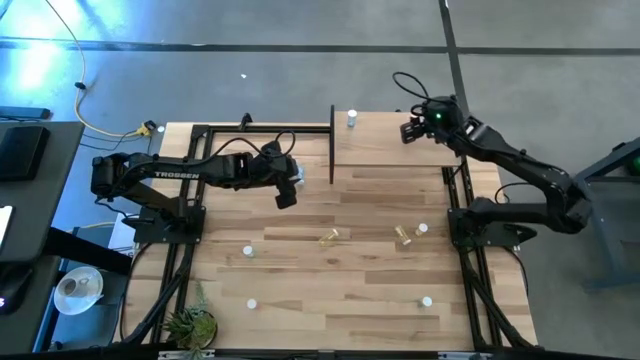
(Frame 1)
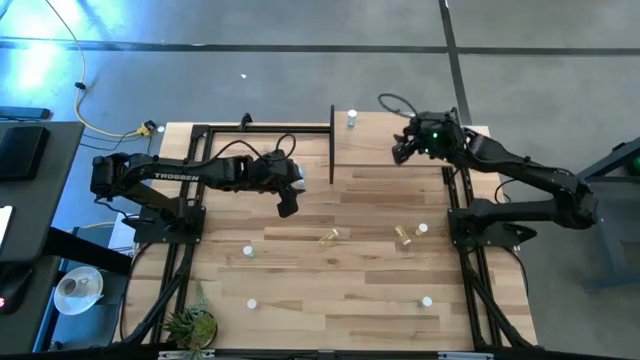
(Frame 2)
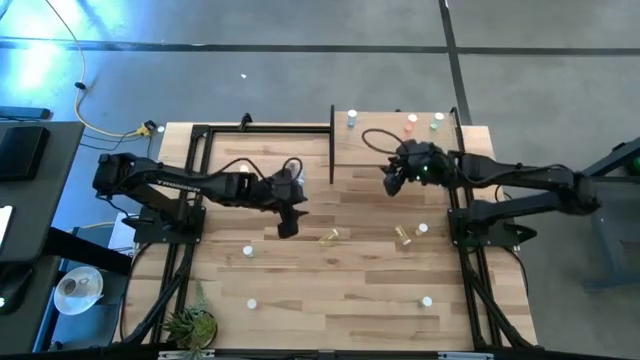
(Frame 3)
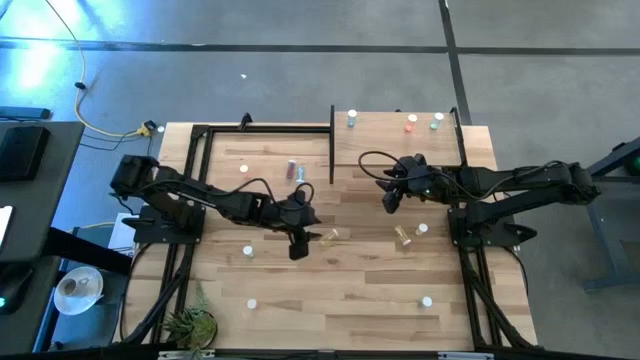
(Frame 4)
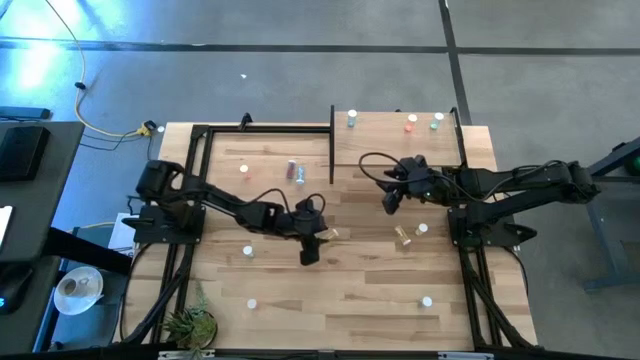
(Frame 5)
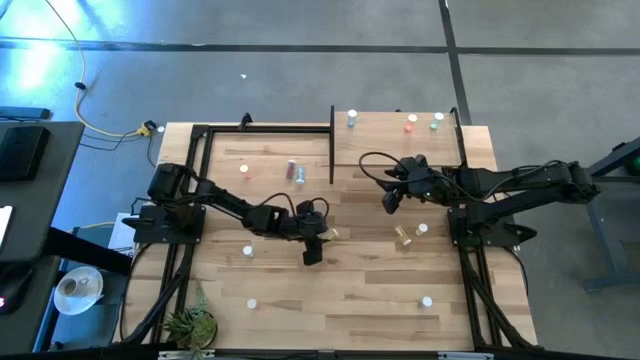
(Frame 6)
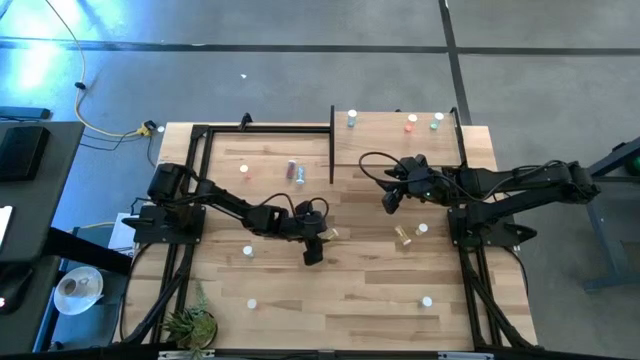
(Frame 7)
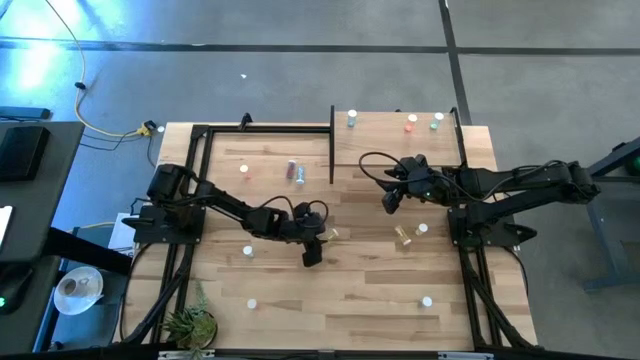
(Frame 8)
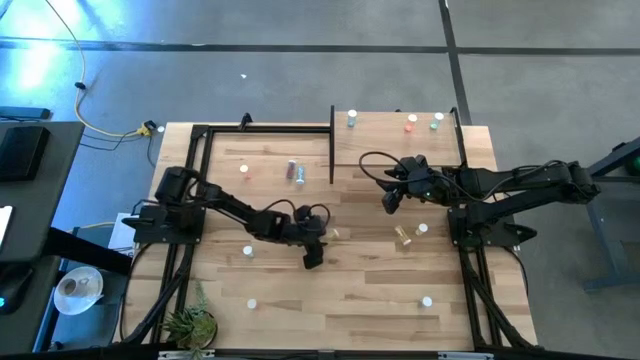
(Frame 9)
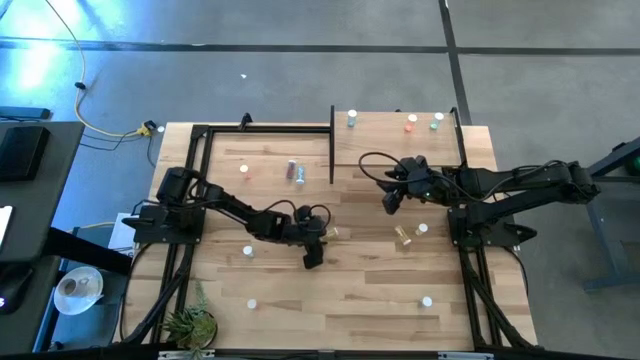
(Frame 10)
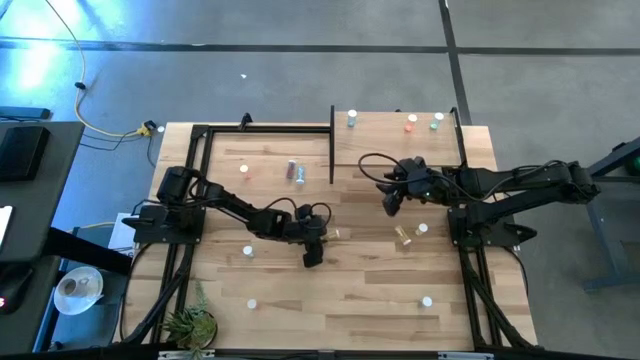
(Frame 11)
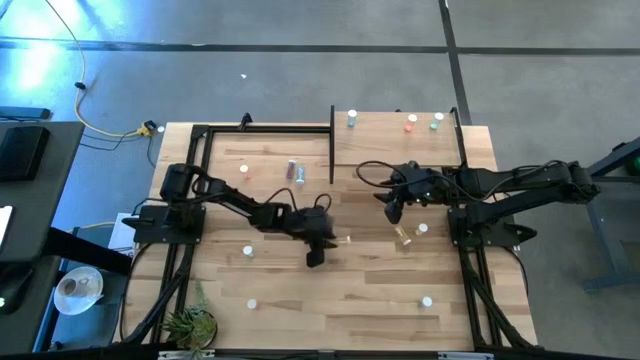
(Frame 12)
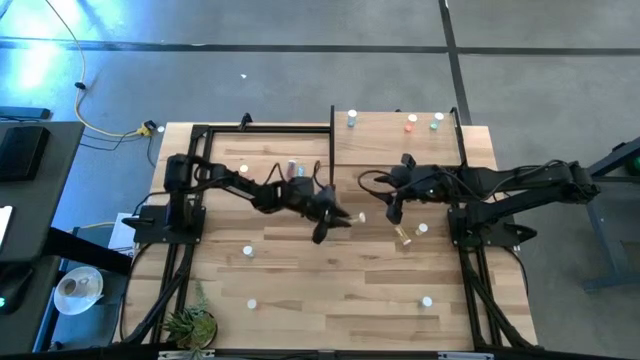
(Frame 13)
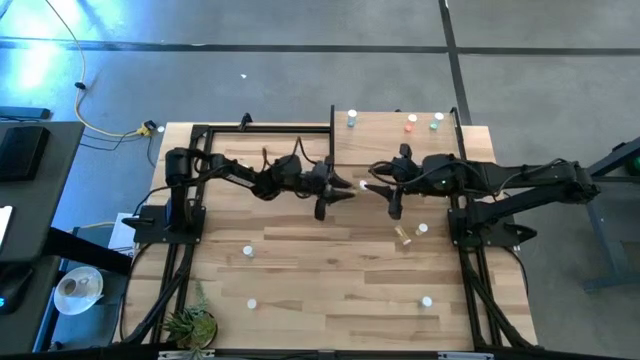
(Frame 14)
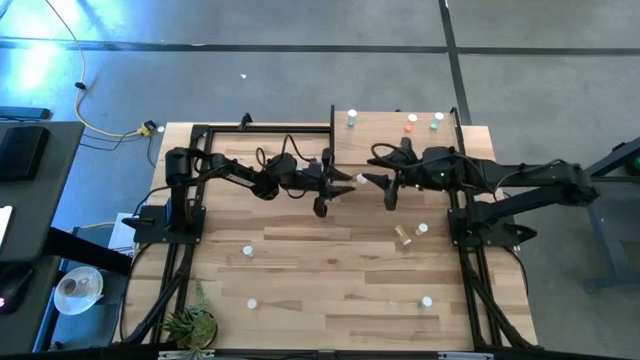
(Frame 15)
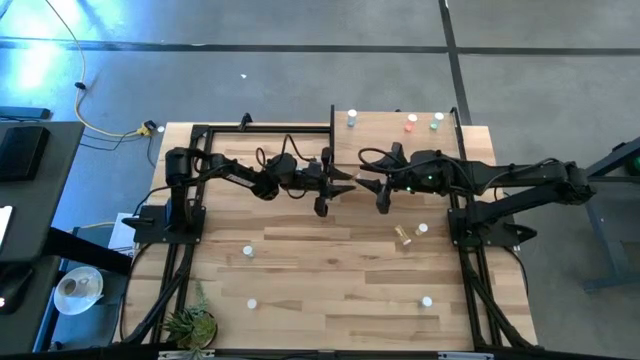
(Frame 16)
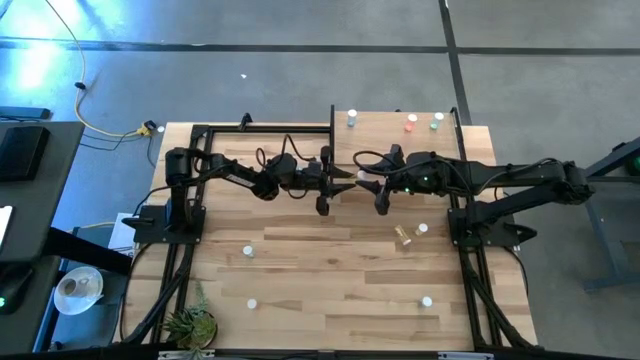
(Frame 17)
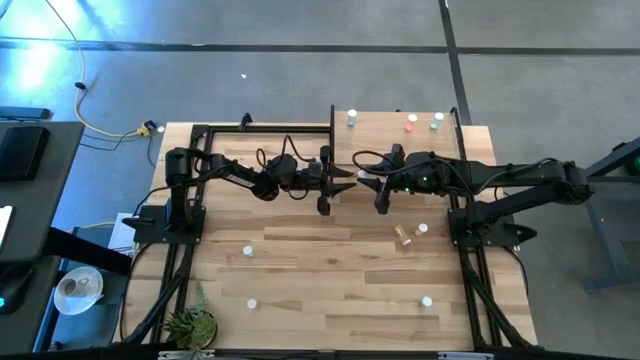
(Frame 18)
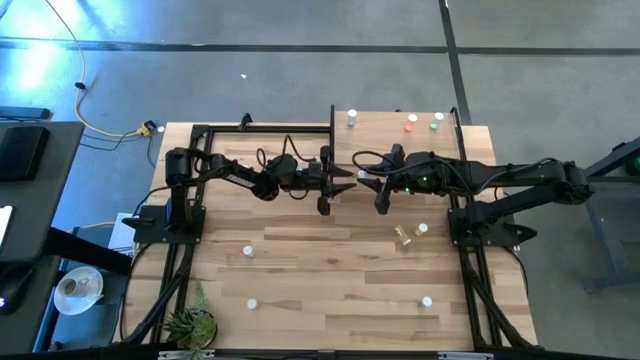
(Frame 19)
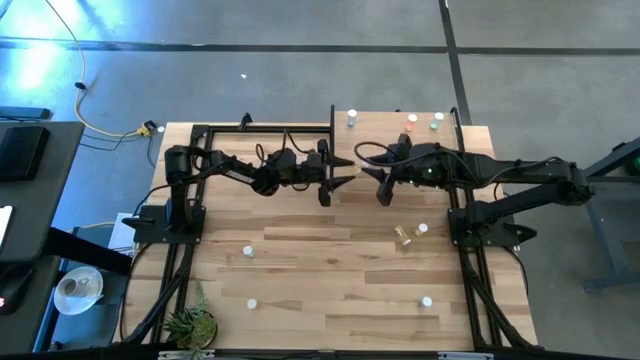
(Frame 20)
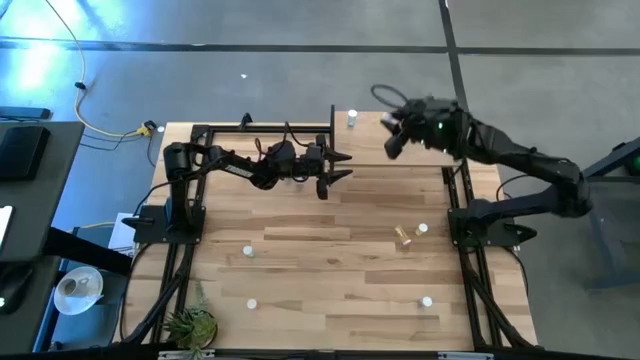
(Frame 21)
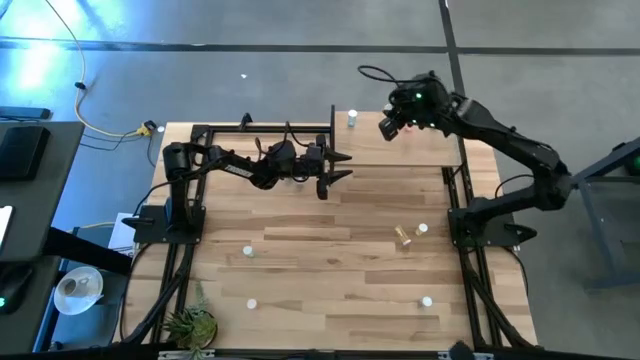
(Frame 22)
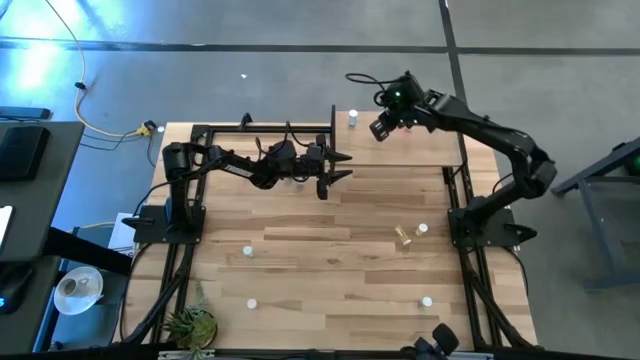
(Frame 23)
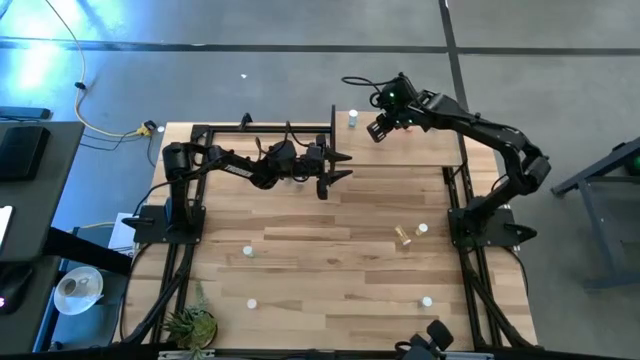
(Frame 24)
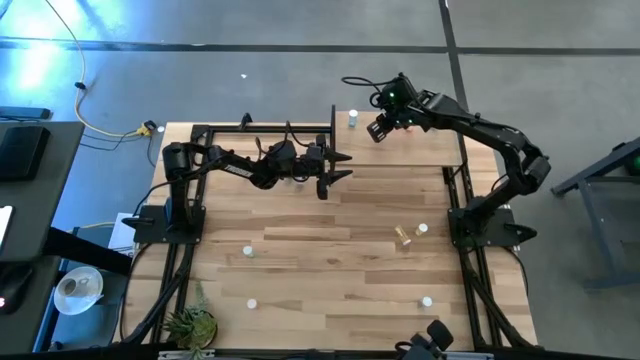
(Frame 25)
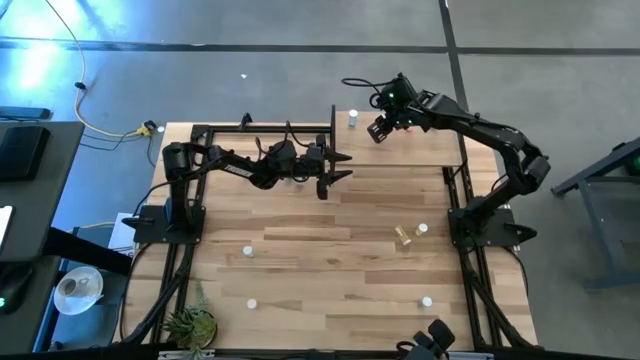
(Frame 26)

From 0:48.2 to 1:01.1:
Task: Pick and place medicine bottles onto shelf by color
Put the left yellow medicine bottle on the shelf

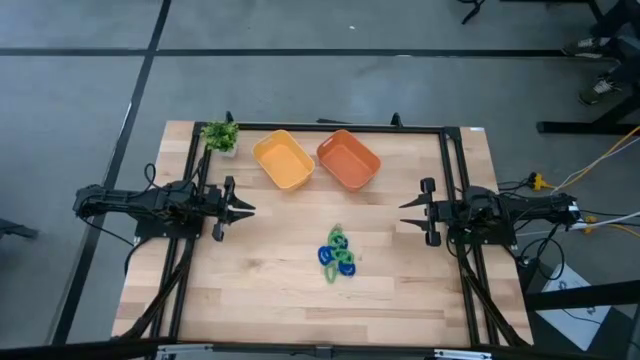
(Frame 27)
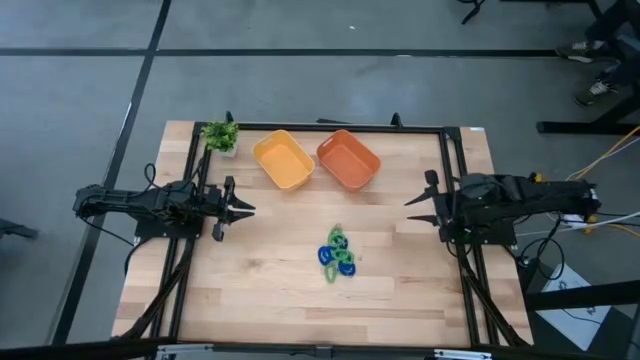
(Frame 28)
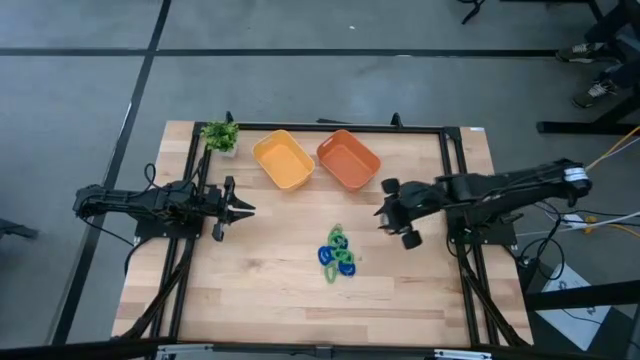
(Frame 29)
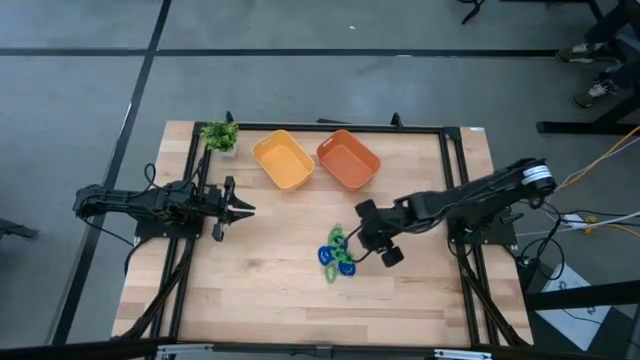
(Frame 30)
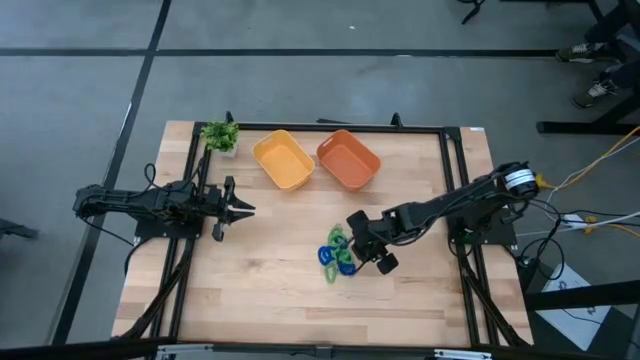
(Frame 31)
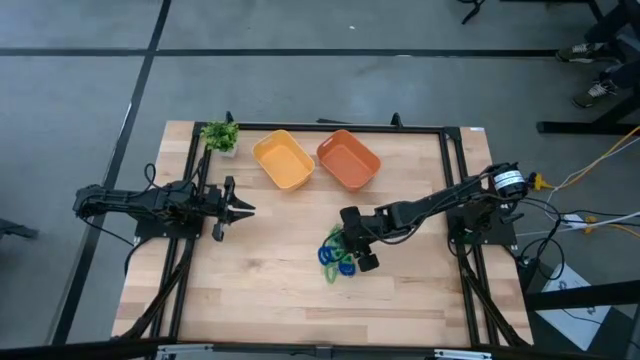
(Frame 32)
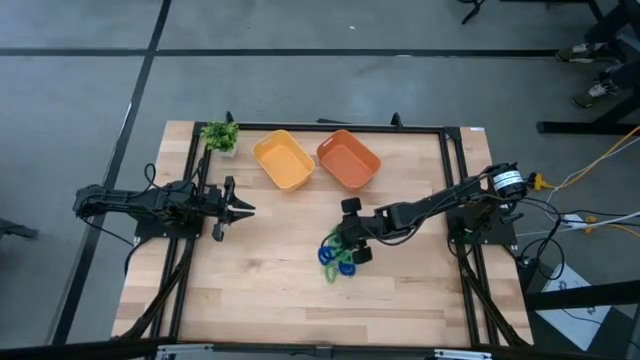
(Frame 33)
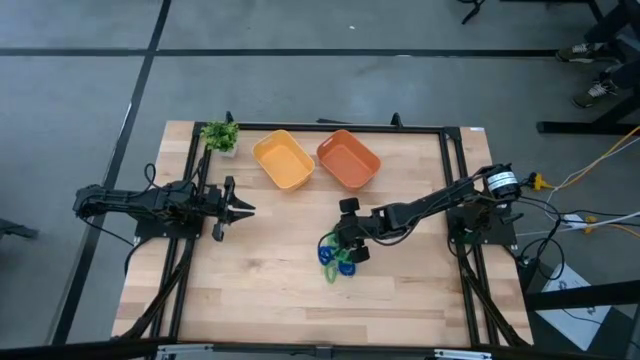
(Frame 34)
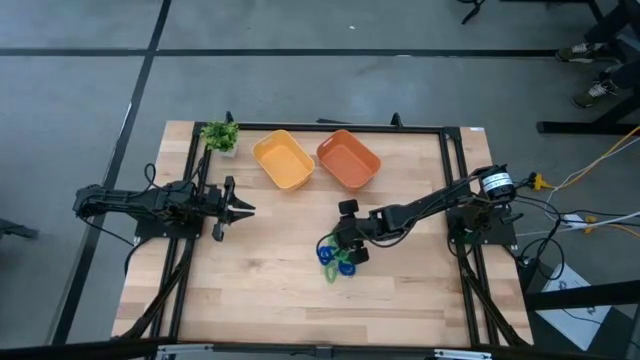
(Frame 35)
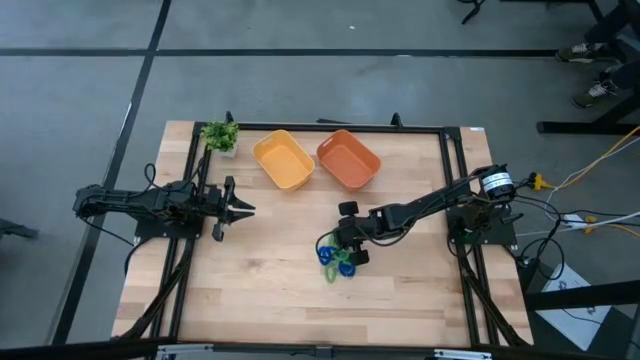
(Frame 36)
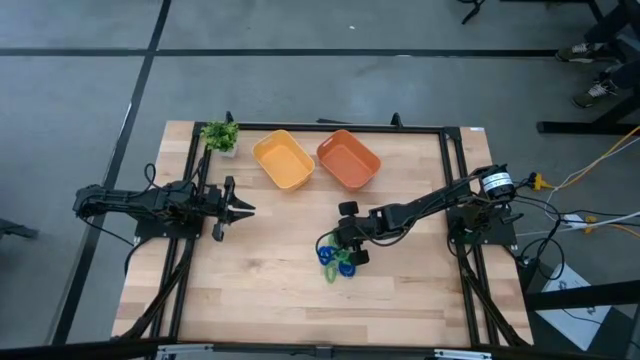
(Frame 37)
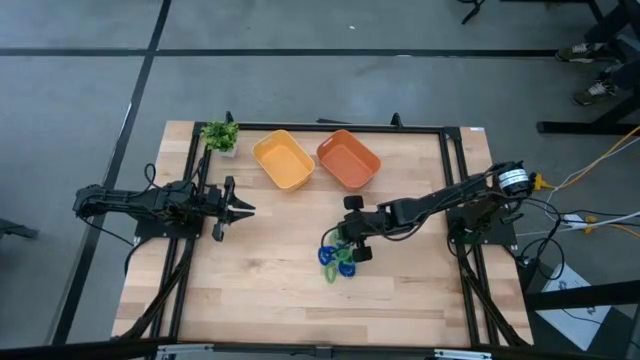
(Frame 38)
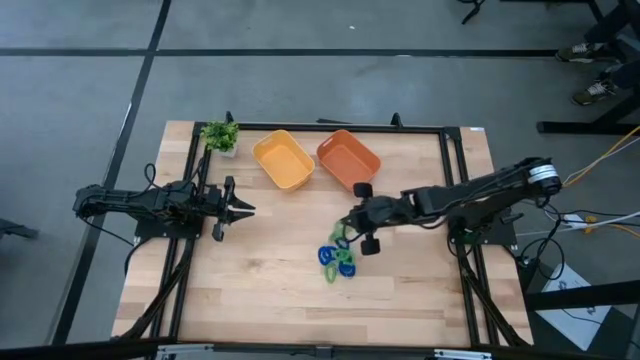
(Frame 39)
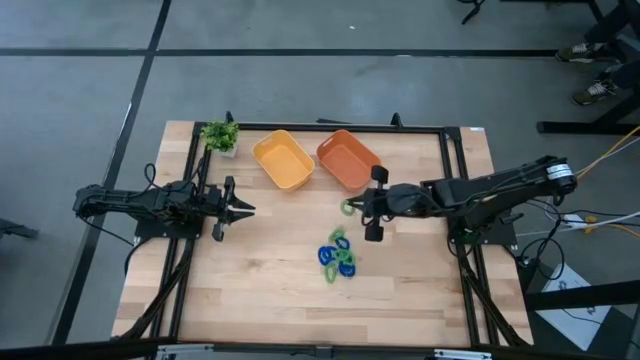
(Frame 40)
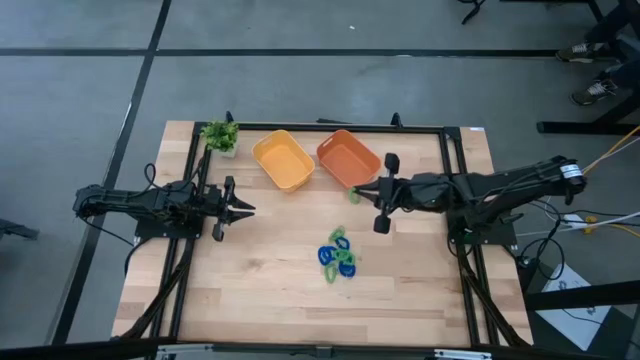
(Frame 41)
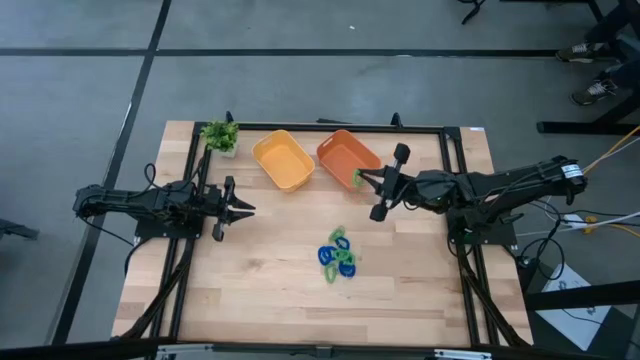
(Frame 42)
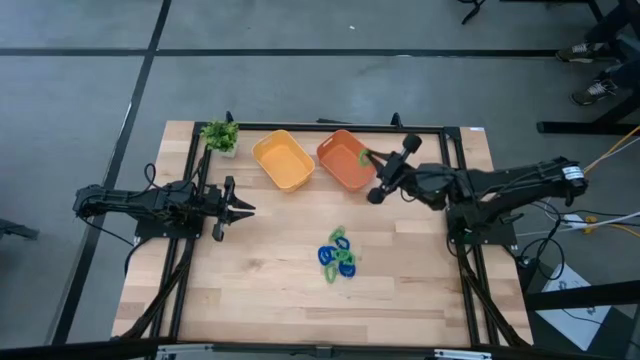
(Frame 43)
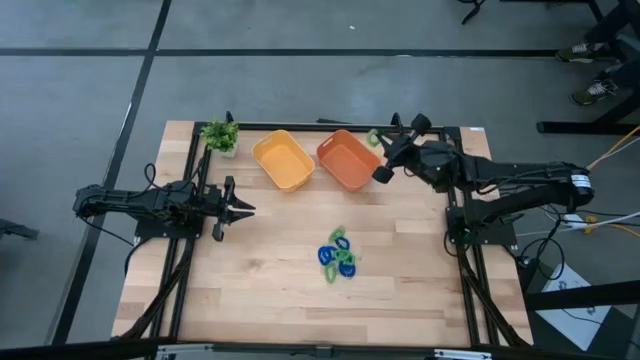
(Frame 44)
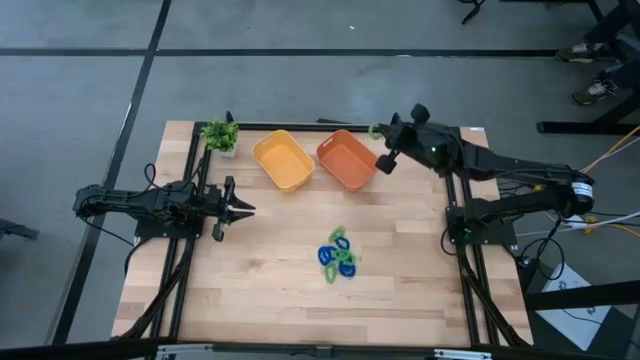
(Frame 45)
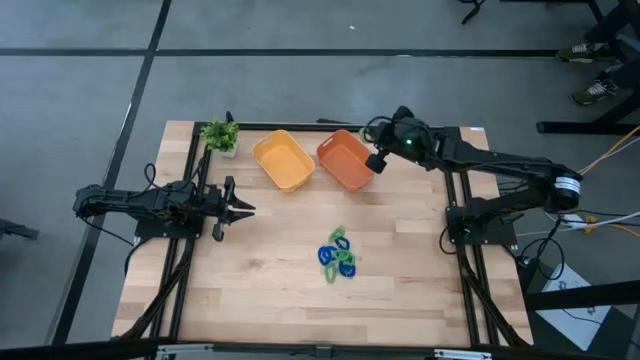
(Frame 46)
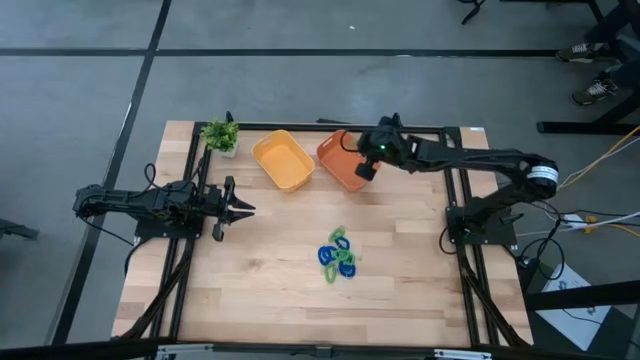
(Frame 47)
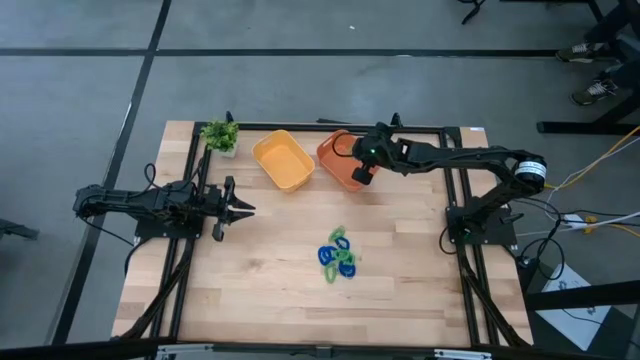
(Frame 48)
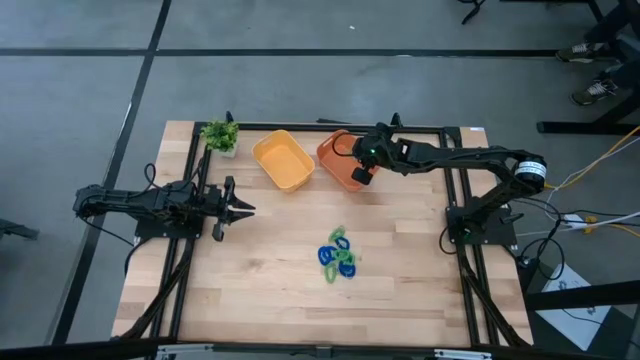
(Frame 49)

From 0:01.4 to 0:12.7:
Task: Sort spring keychains
Put the green spring keychain into the orange bin
